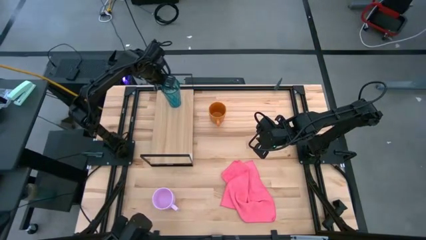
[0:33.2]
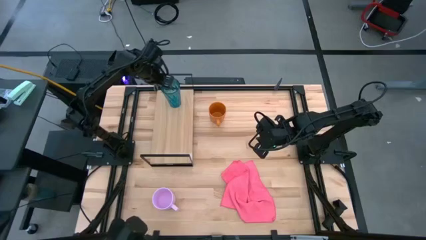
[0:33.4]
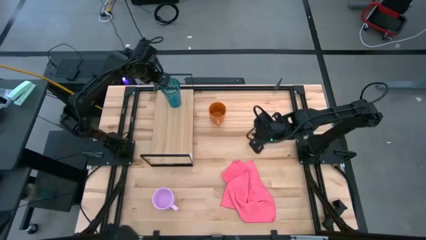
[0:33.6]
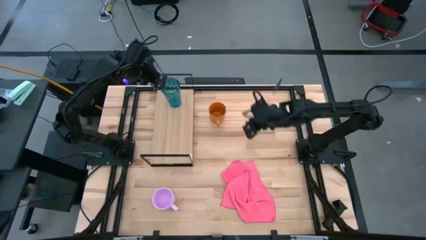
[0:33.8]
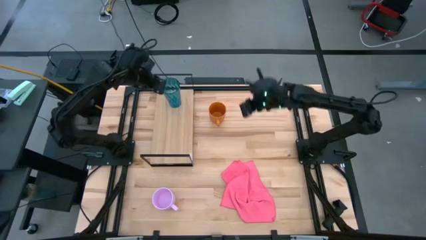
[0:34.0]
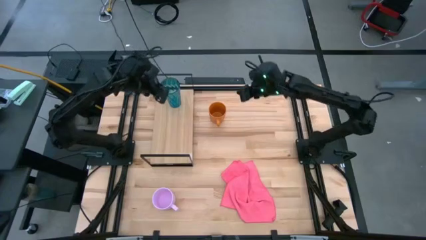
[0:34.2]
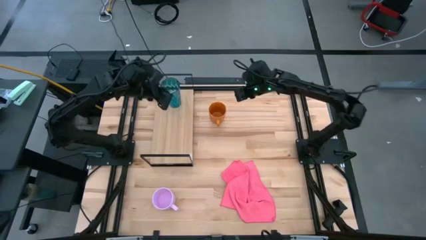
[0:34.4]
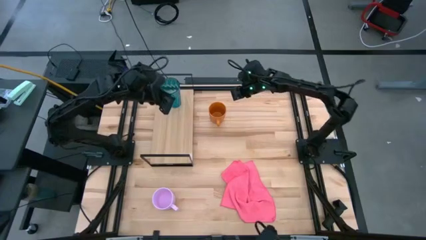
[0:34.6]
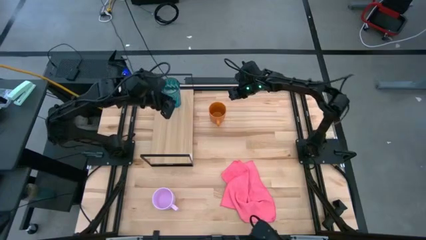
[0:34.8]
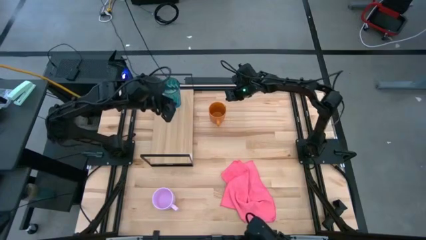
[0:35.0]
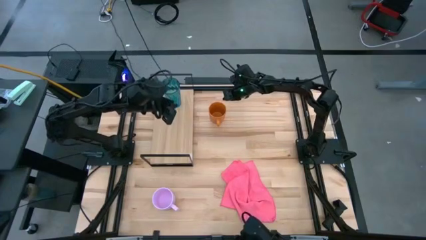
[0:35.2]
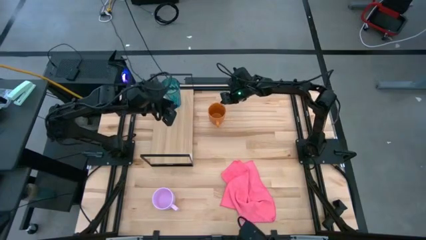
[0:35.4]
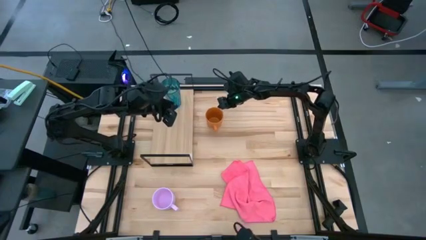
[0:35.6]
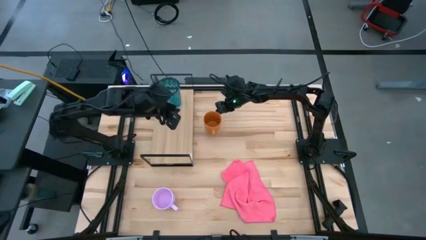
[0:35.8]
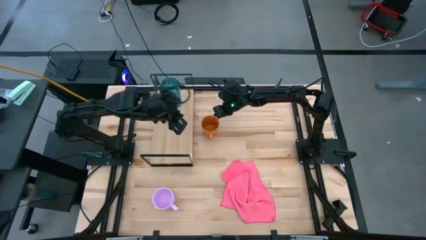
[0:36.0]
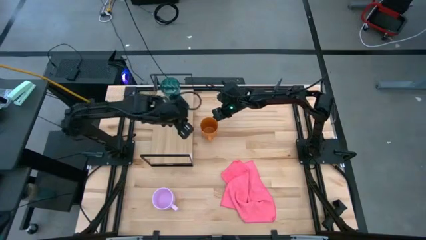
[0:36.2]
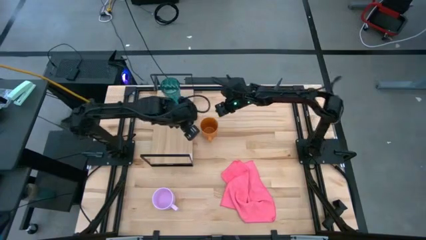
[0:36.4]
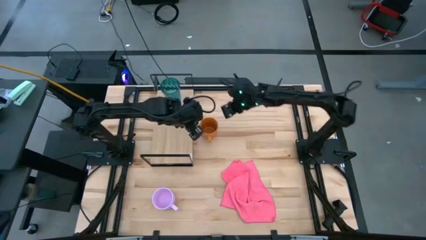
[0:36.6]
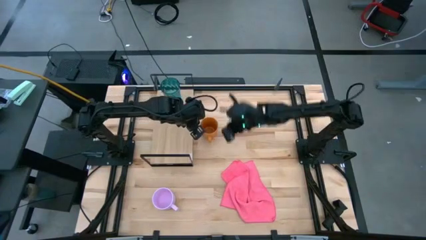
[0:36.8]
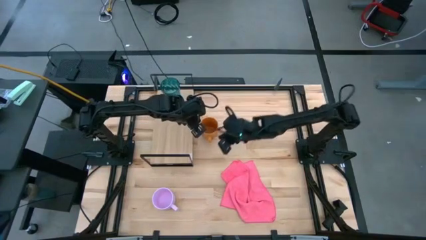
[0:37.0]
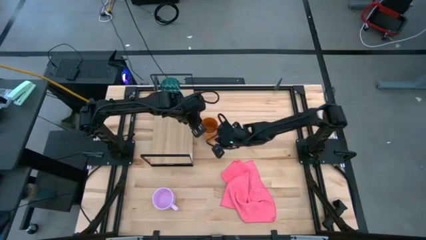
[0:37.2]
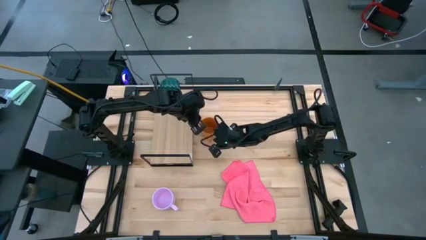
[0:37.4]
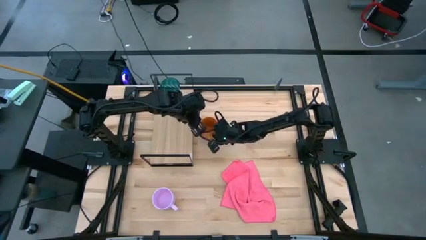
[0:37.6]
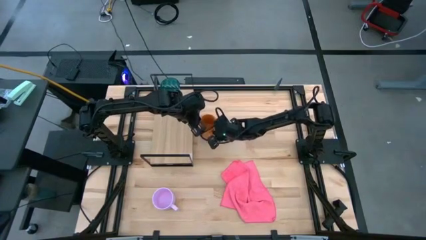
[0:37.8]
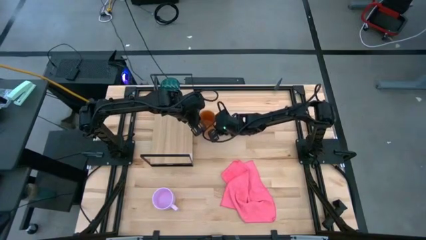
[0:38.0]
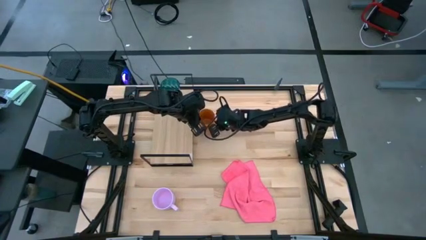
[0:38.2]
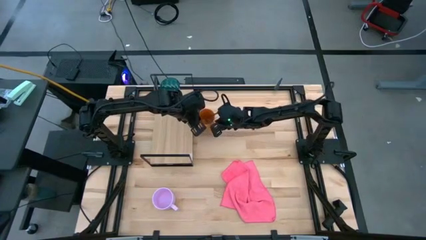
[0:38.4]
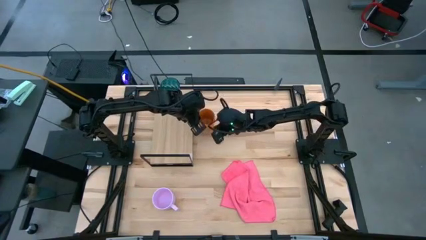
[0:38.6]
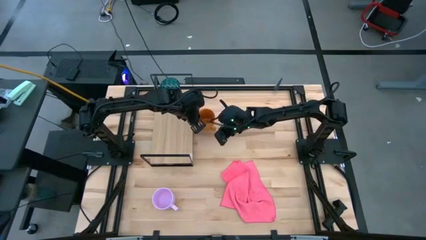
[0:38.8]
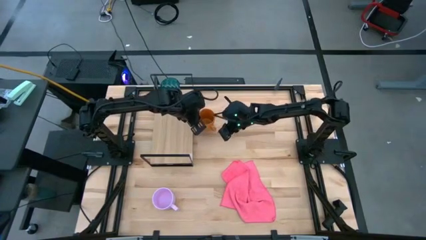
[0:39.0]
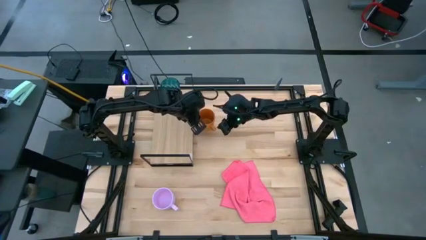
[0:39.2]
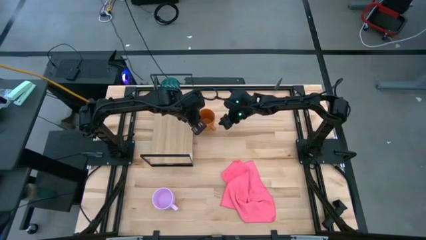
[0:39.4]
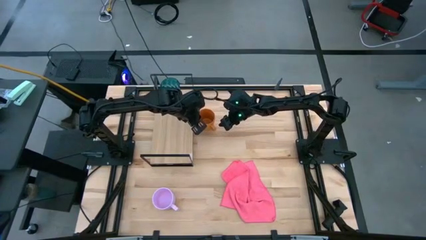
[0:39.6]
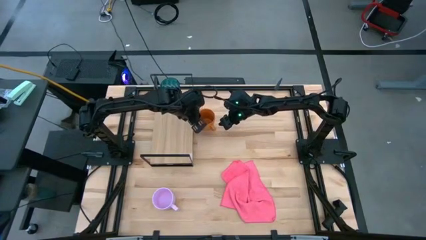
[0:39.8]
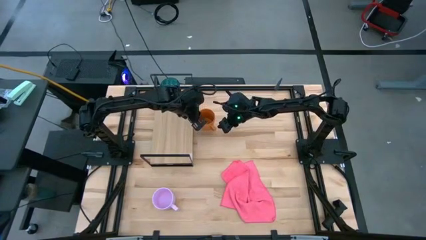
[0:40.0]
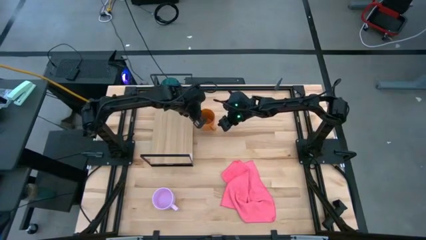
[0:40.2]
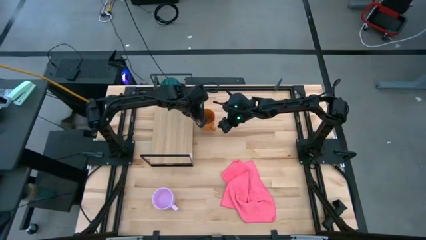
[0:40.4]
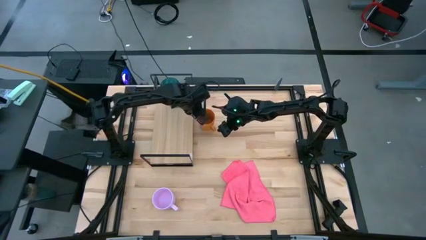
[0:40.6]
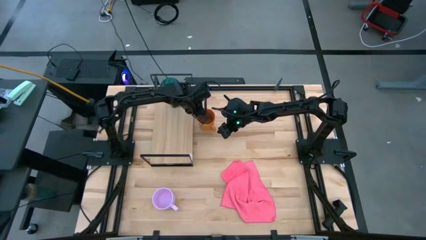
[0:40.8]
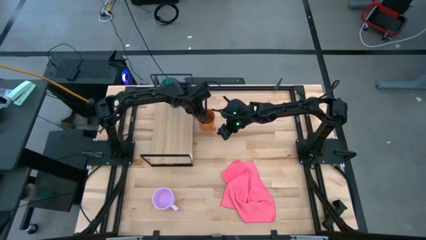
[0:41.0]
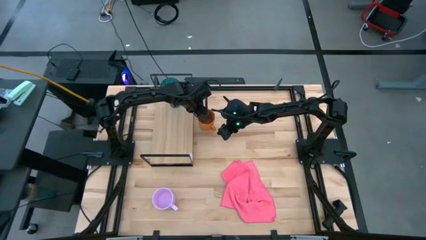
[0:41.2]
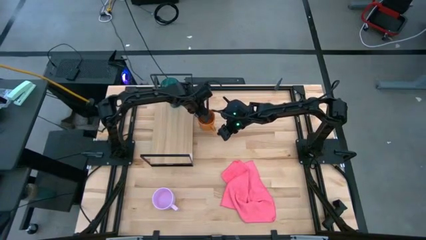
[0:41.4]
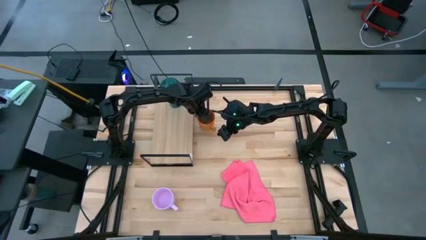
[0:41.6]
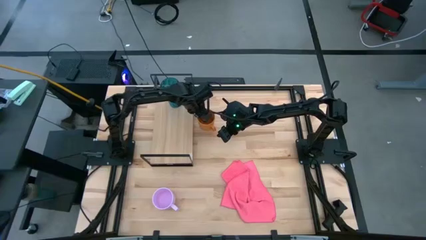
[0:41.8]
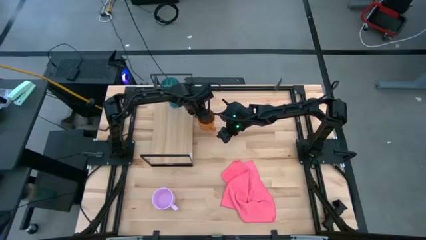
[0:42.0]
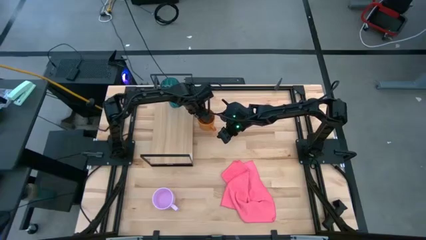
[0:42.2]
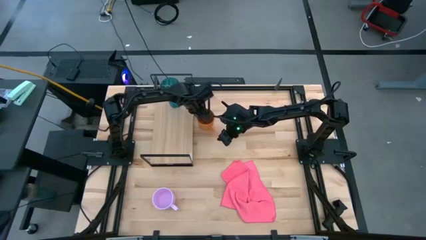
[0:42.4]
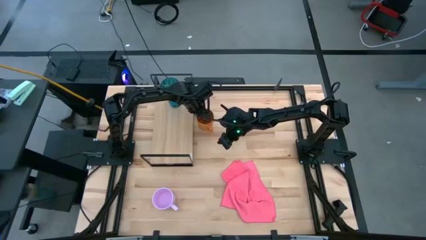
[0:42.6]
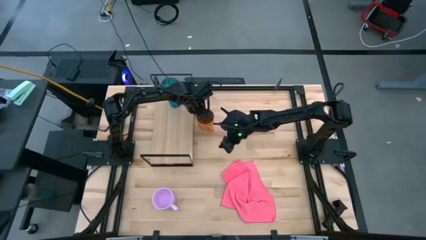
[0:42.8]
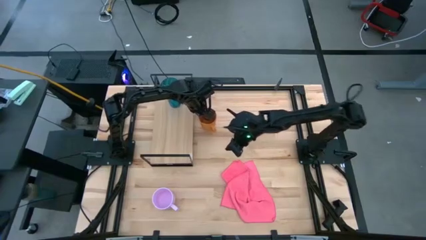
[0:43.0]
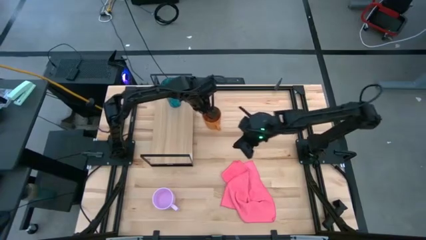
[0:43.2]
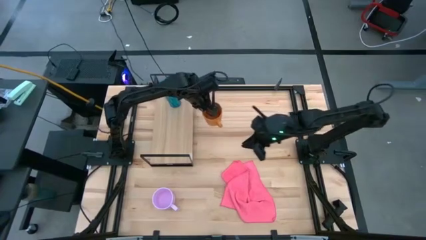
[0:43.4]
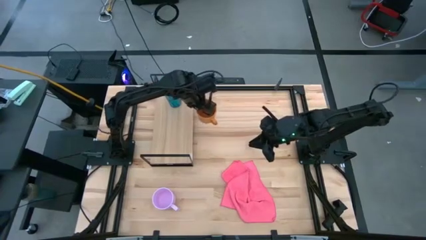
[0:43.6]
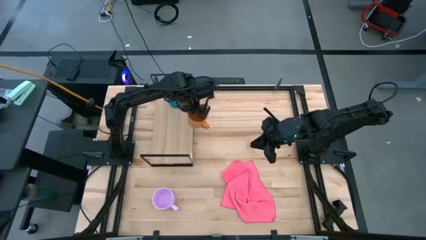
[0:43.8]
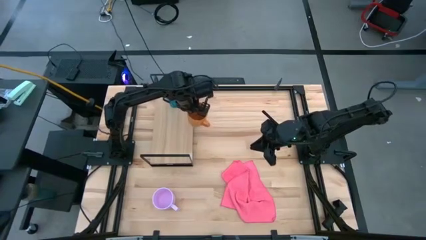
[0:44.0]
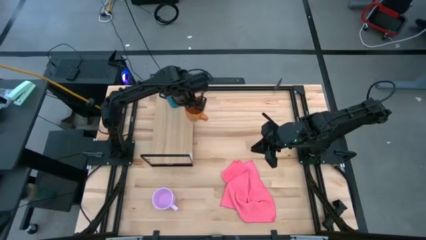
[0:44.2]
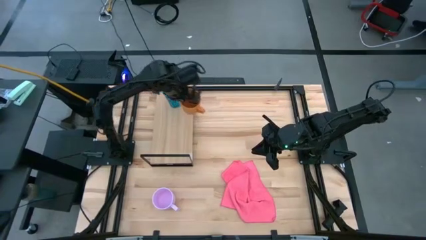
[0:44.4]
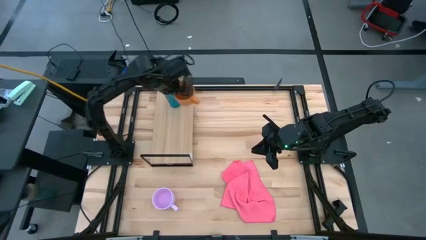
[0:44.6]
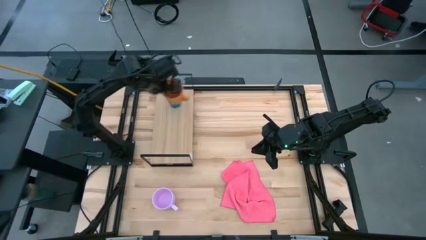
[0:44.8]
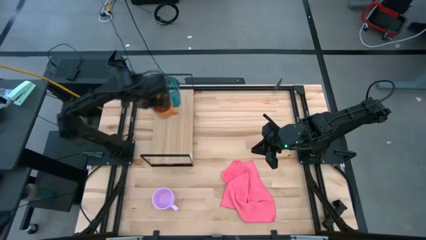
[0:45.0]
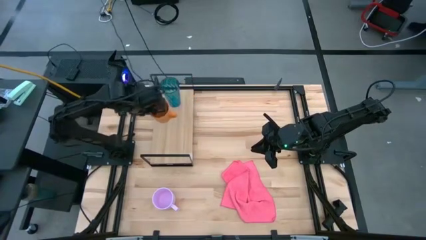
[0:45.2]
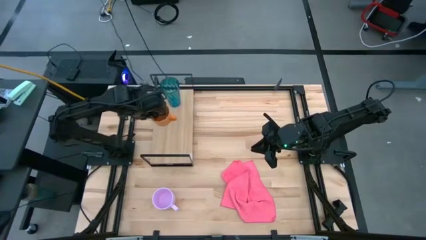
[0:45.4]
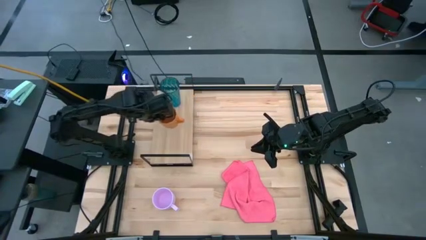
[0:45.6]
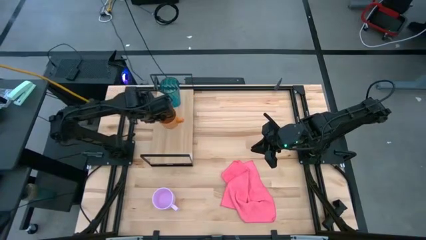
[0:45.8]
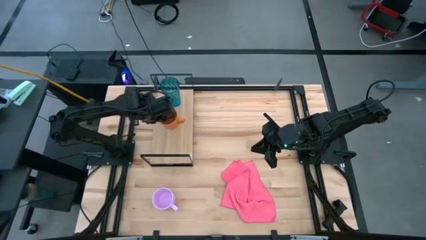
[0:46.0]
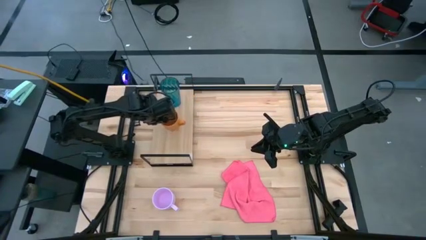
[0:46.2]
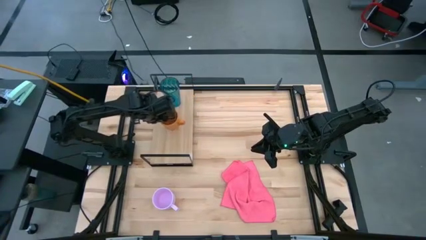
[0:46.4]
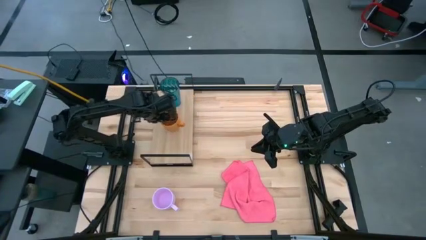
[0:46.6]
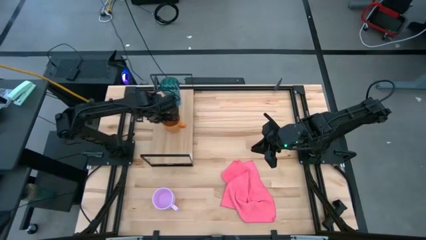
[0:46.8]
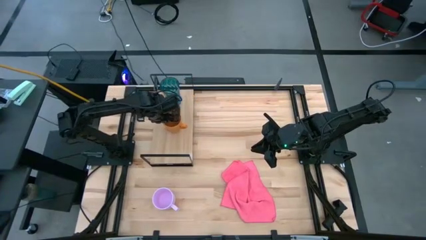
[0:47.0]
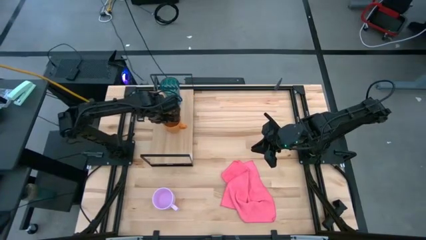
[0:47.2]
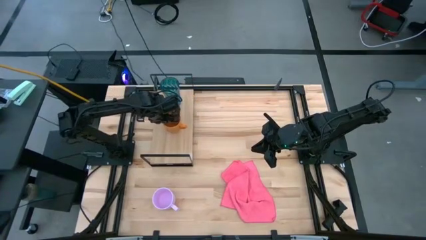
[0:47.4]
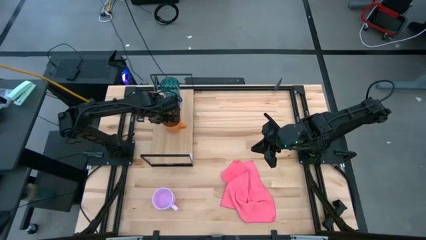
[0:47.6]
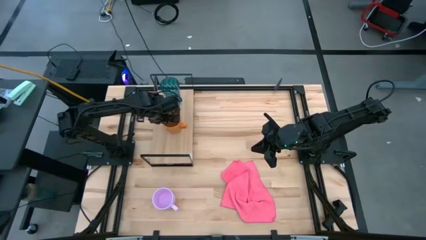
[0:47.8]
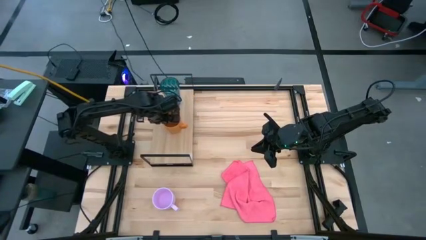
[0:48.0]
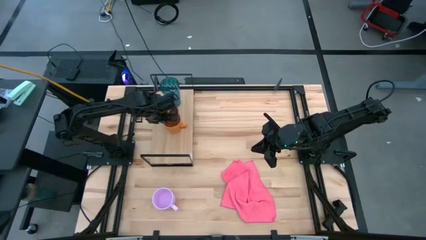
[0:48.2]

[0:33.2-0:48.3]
Task: Stack small to large cups/mugs on shelf
Put the orange mug on the shelf
